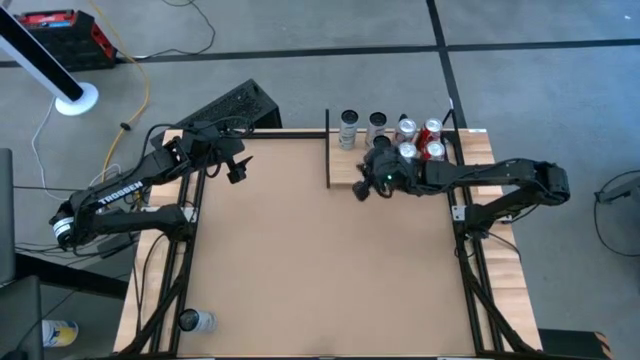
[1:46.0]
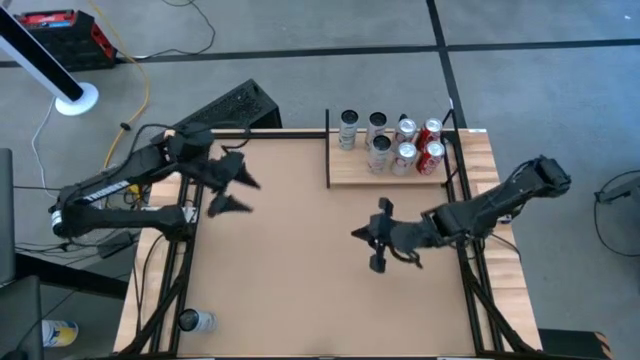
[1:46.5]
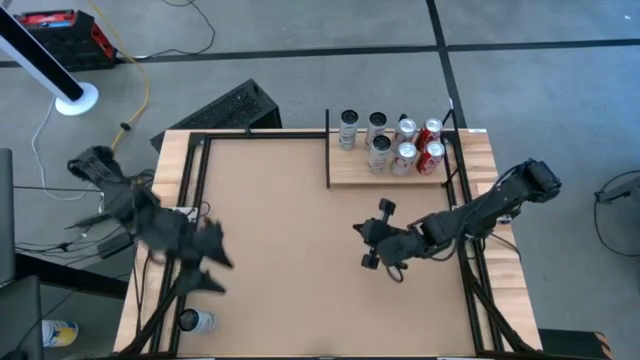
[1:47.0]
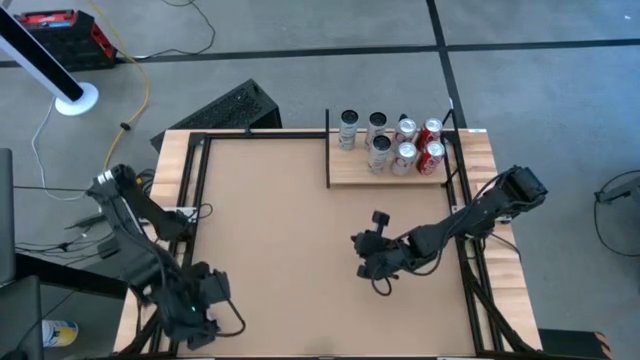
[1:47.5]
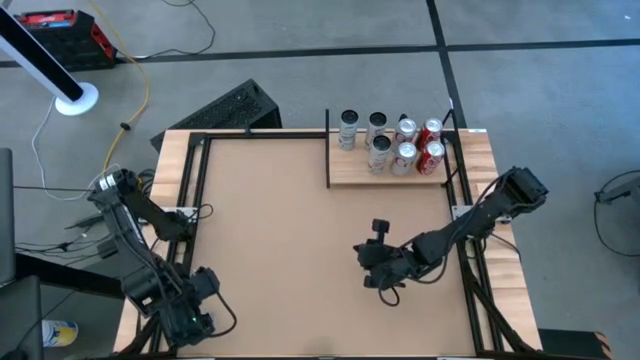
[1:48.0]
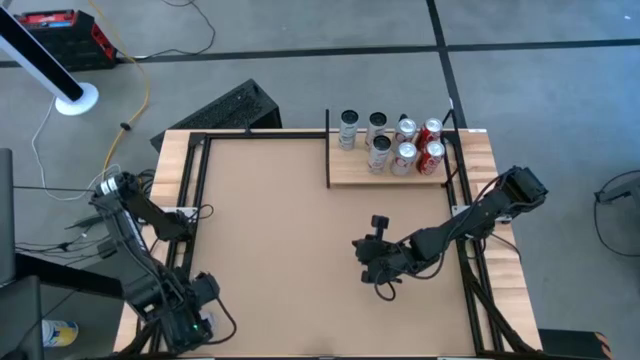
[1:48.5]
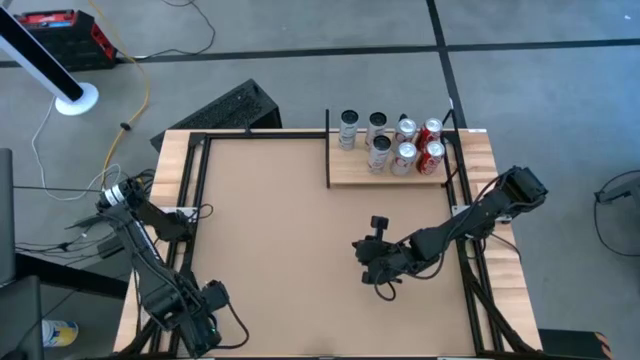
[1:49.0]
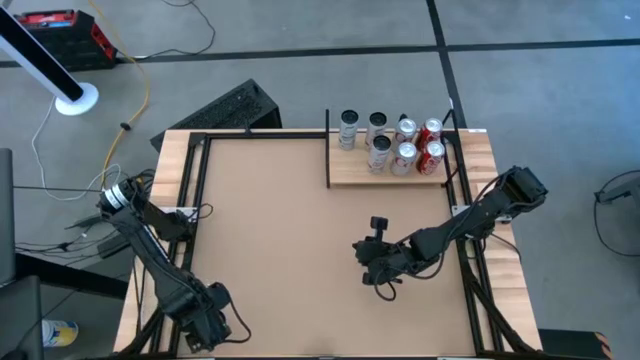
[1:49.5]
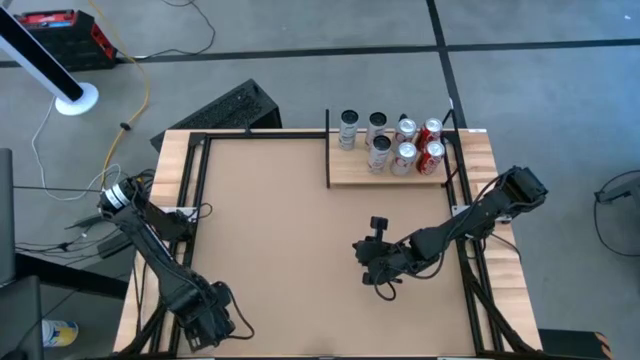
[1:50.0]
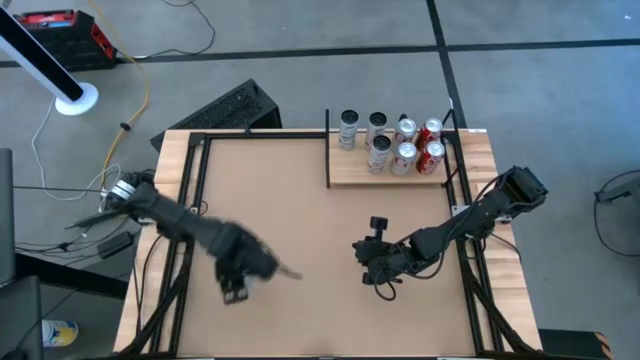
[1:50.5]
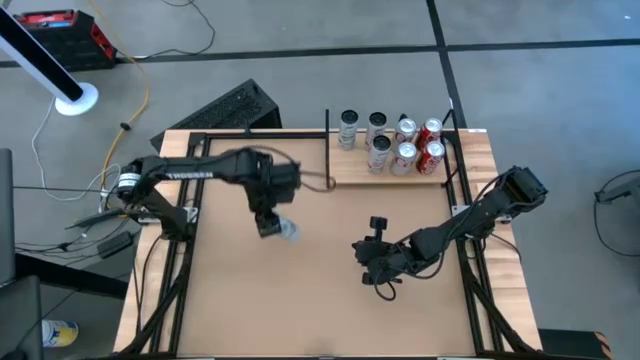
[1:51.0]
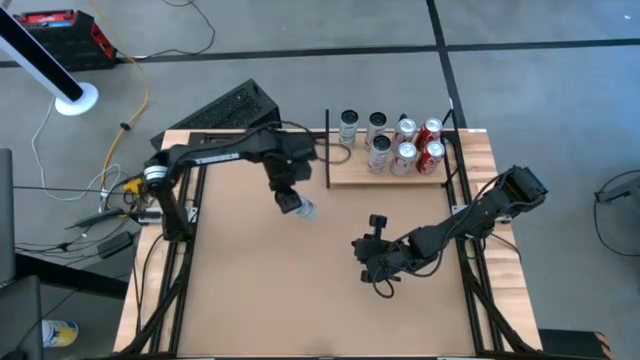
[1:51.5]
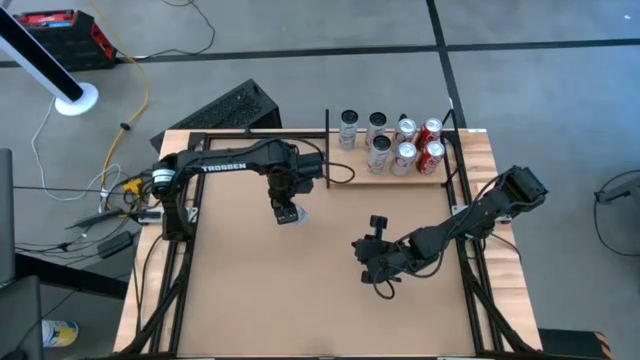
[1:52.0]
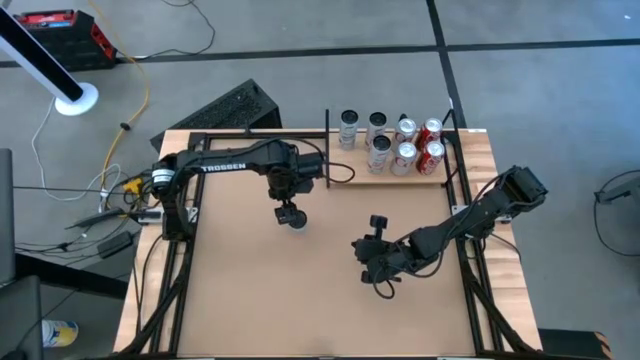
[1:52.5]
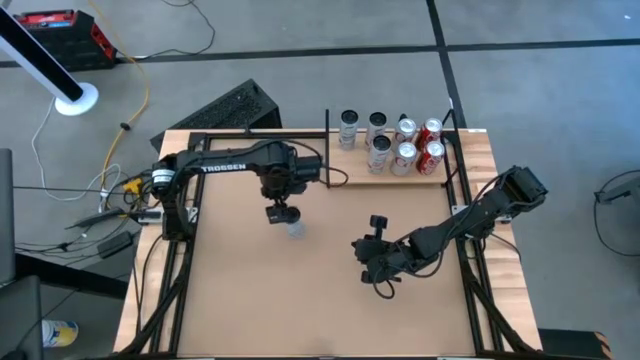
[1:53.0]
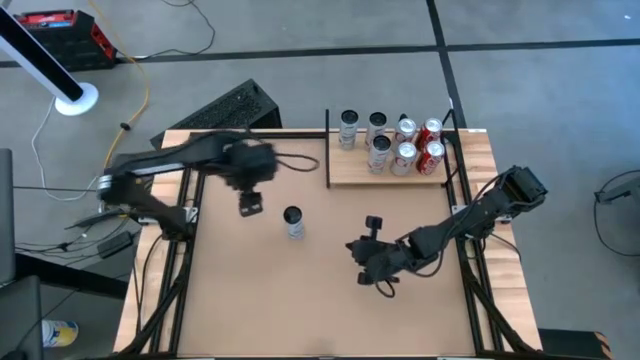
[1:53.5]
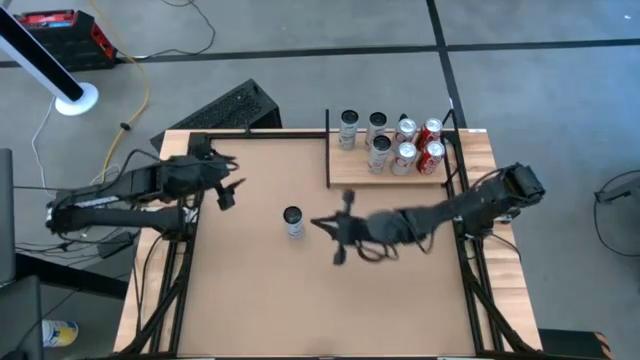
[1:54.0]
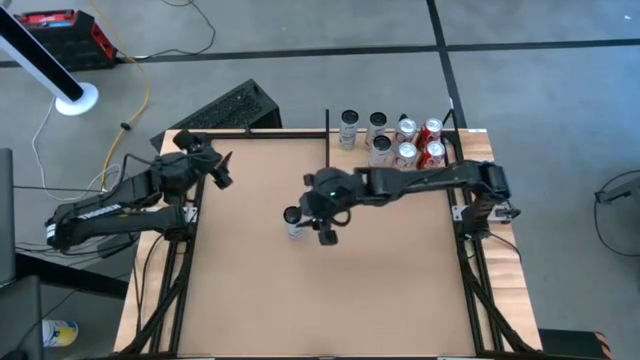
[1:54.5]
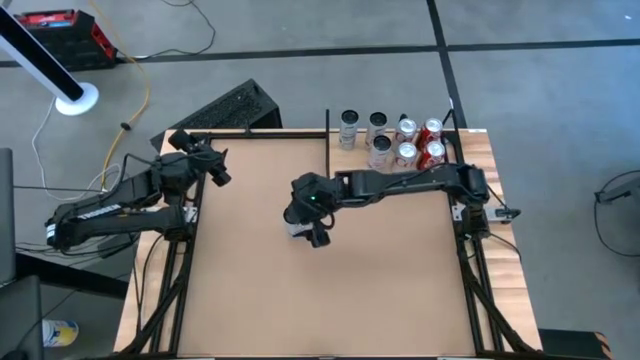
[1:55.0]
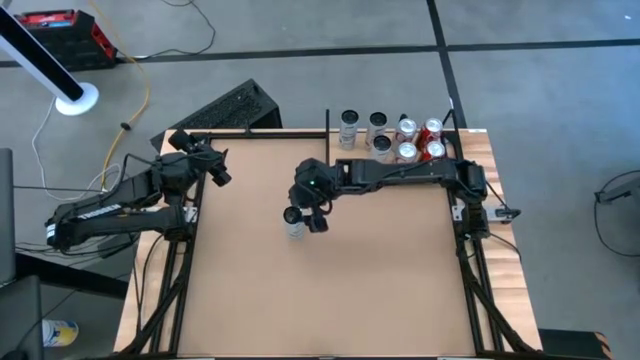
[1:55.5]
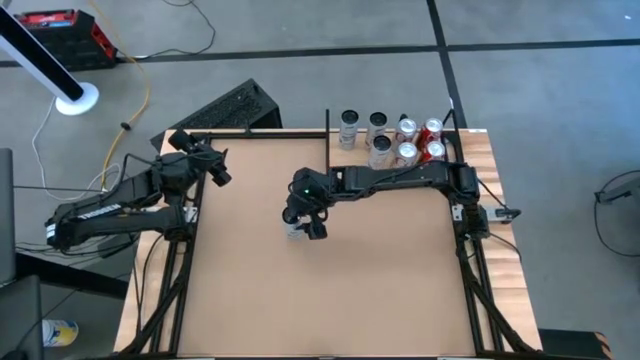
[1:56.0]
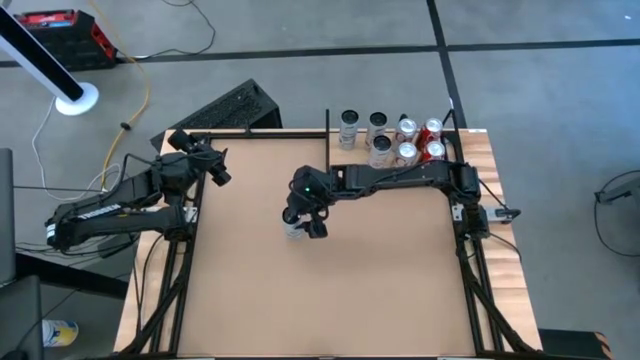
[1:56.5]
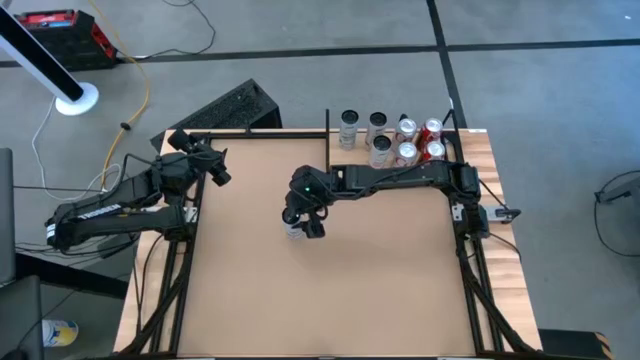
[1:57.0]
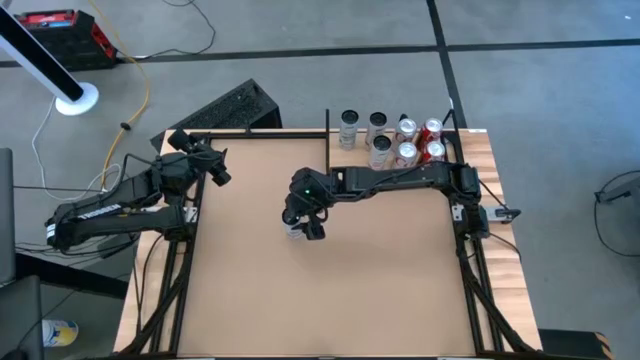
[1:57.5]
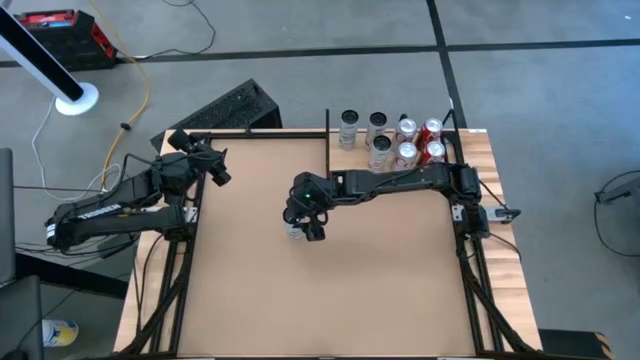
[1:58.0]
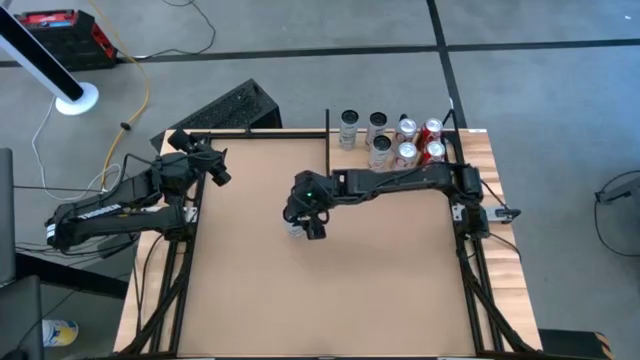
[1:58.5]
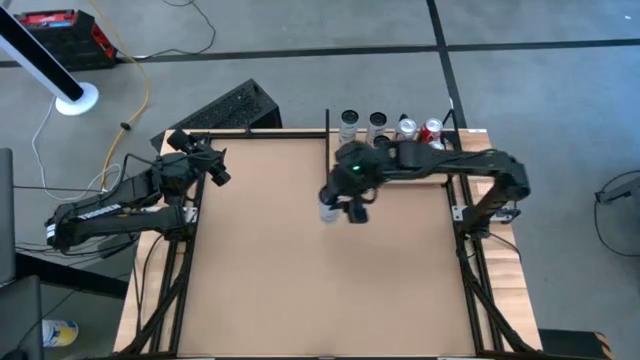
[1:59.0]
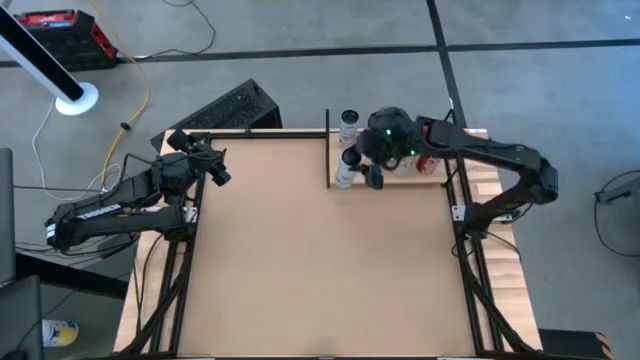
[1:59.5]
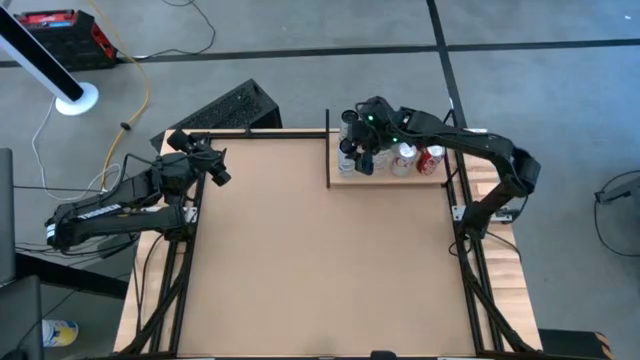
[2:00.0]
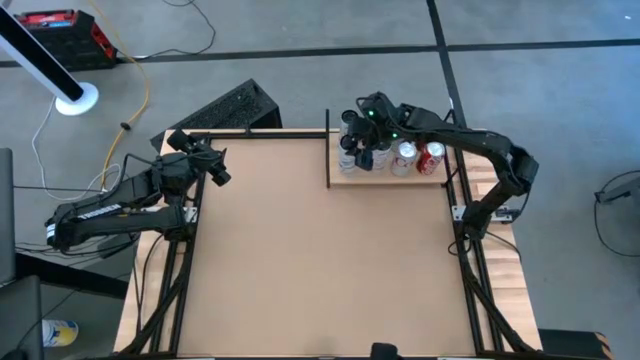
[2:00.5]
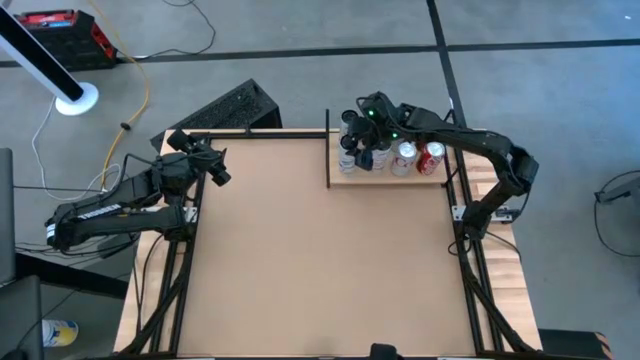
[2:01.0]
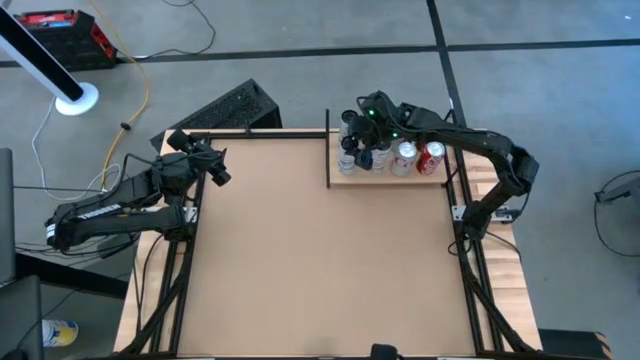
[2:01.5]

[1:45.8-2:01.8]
Task: Place canned beverage on shelf
Put the white and blue soda can on the shelf and align it with the other white and blue soda can

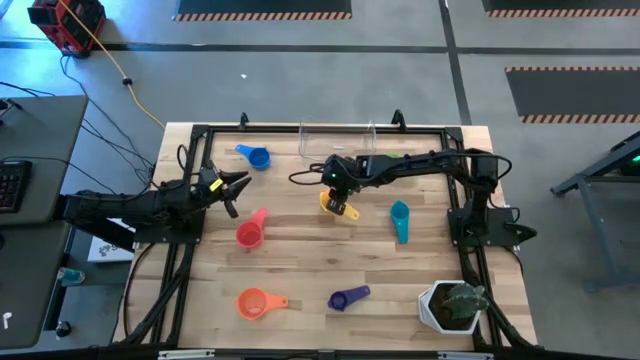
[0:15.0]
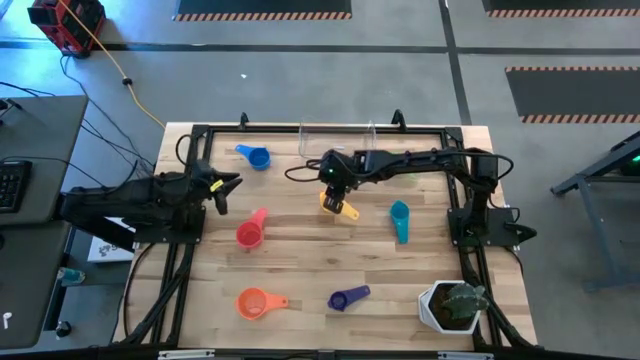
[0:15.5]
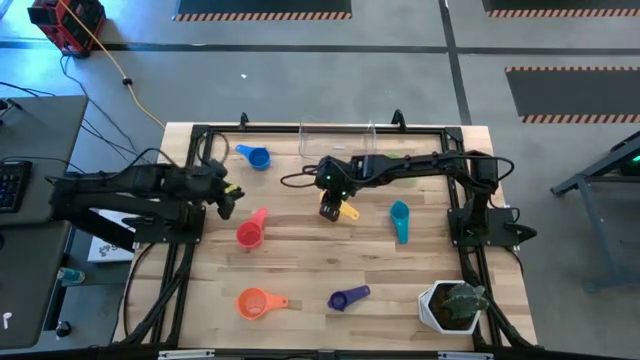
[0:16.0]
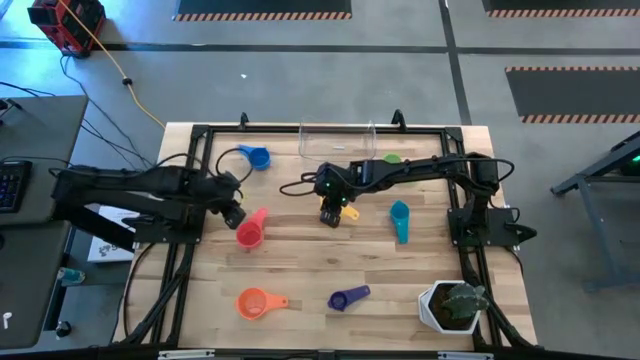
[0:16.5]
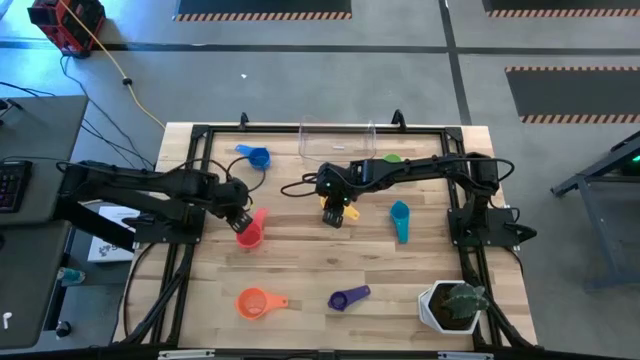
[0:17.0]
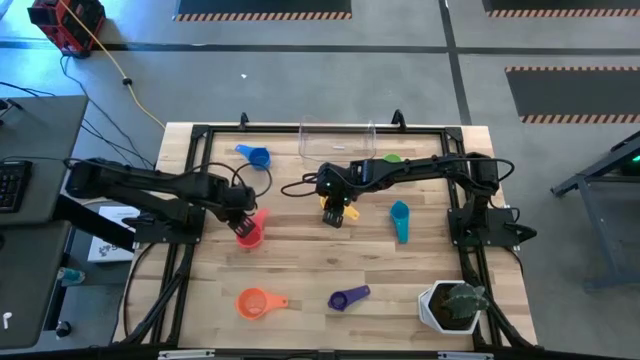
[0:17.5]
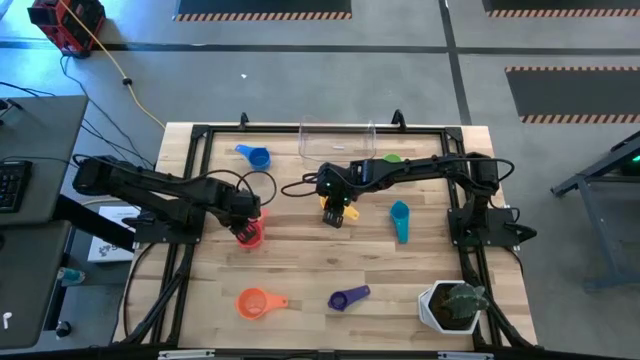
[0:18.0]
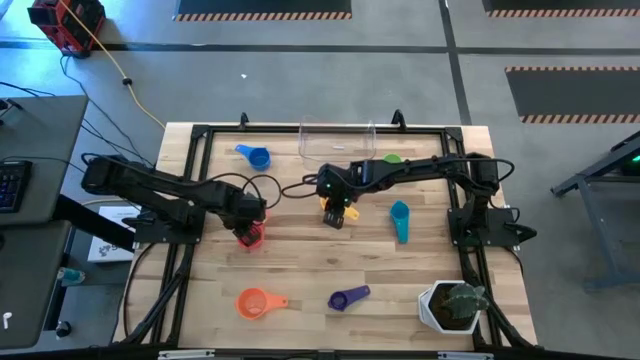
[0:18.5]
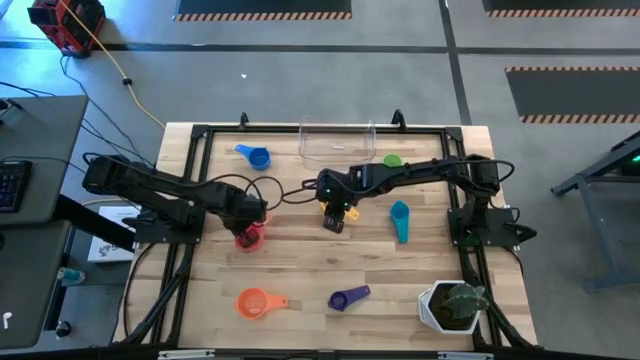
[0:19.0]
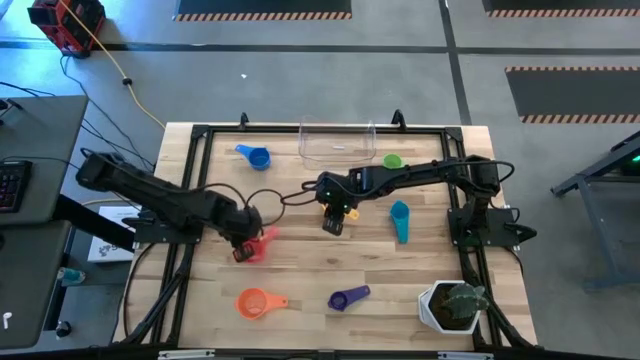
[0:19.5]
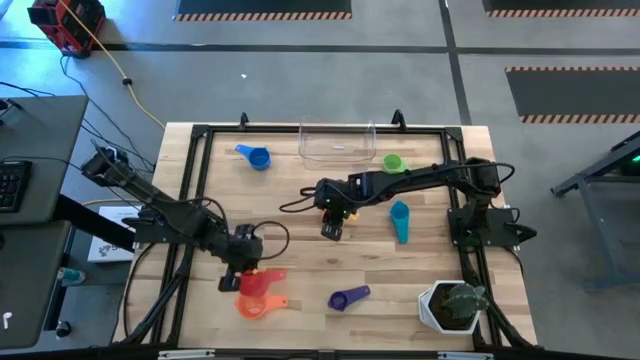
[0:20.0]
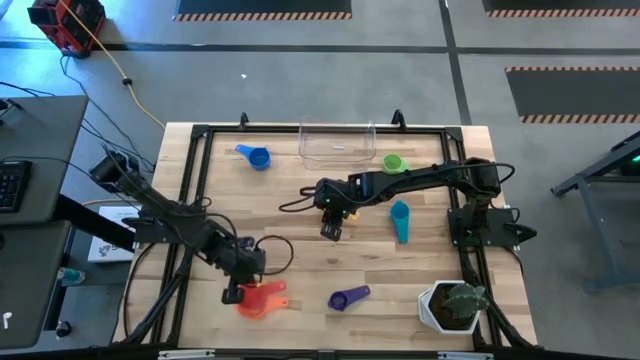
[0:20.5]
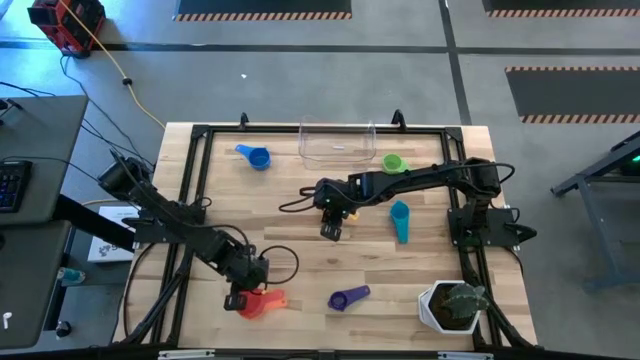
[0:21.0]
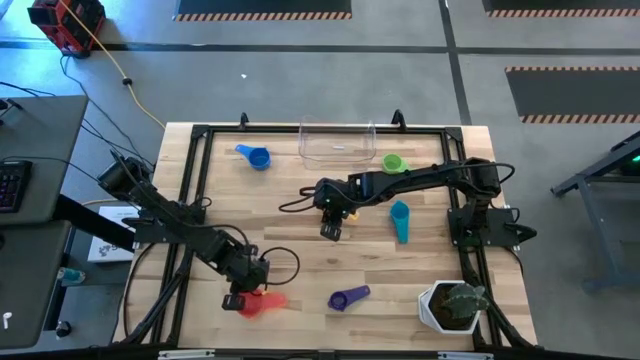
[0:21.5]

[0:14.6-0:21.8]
Task: Nest measuring cups in basket
Stack the red measuring cup into the orange measuring cup
